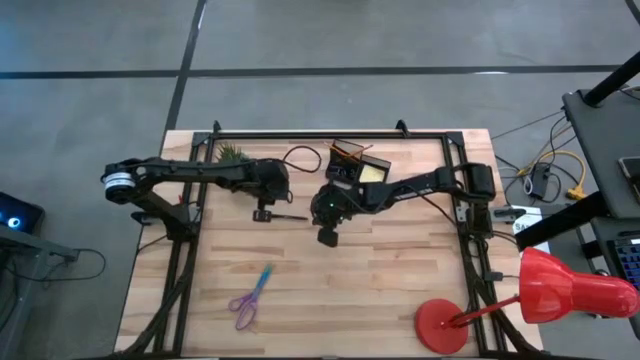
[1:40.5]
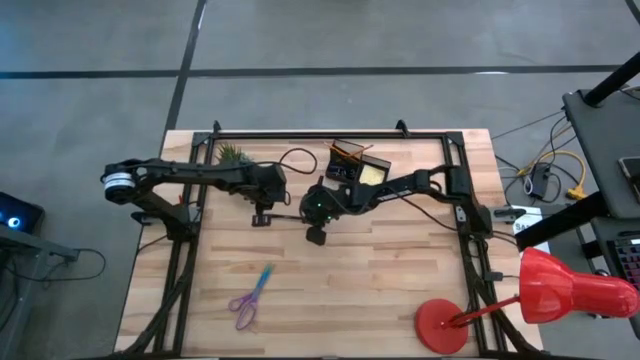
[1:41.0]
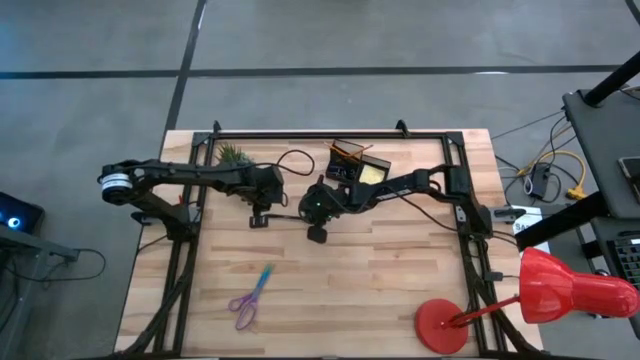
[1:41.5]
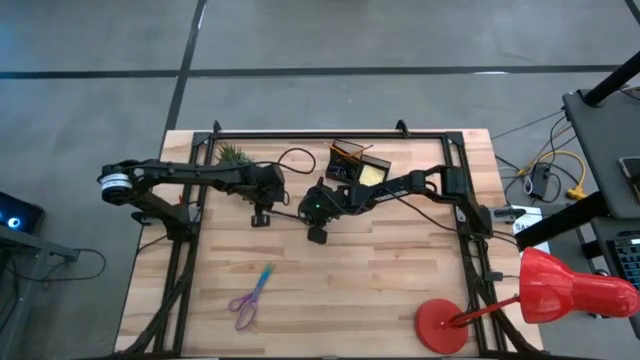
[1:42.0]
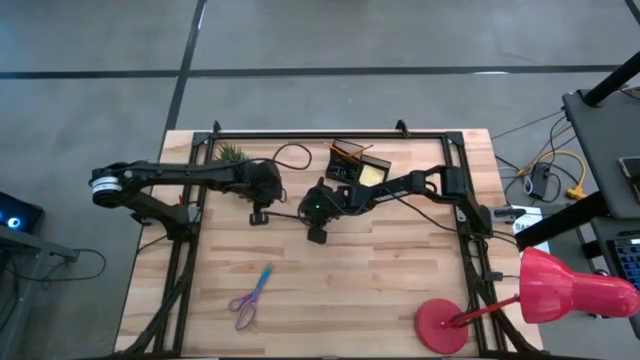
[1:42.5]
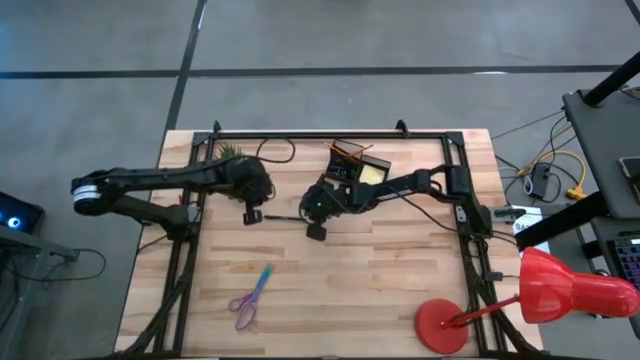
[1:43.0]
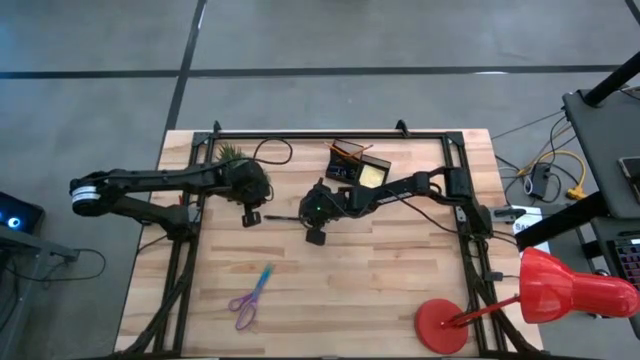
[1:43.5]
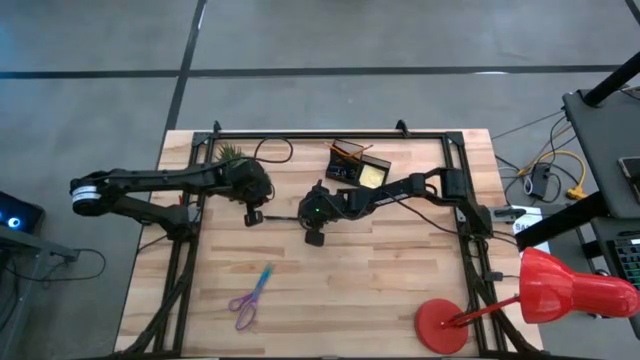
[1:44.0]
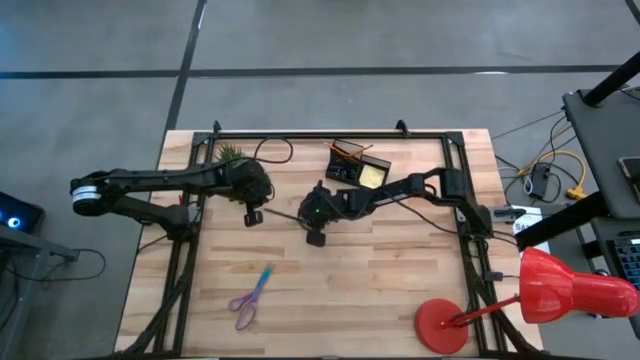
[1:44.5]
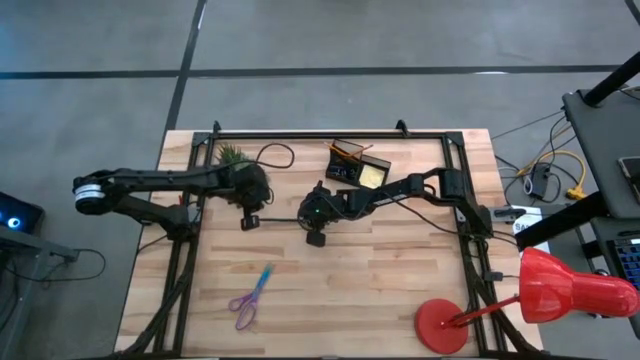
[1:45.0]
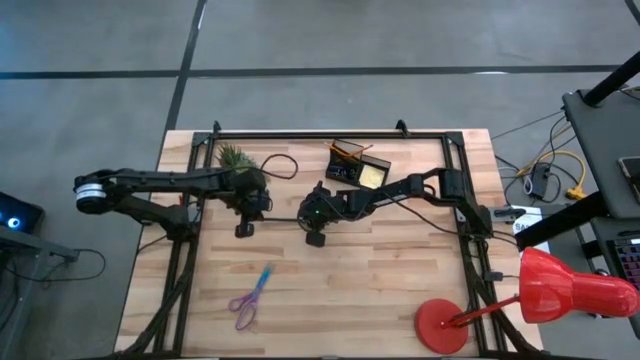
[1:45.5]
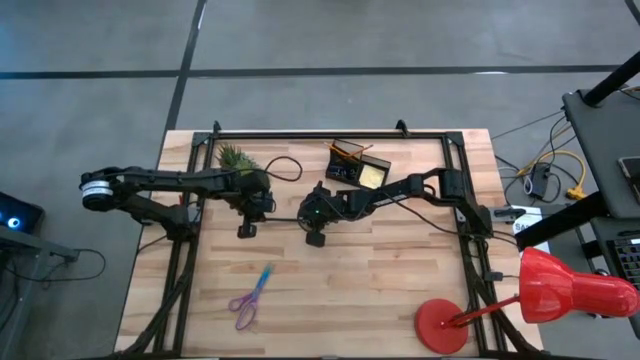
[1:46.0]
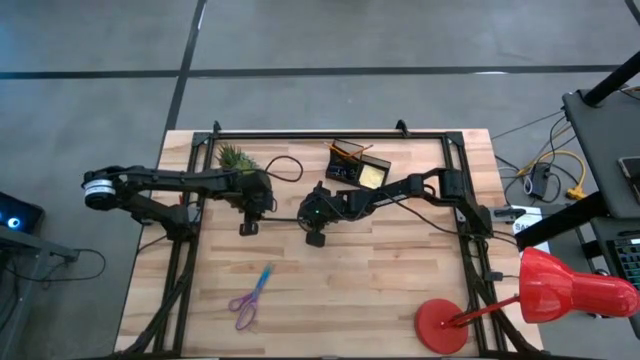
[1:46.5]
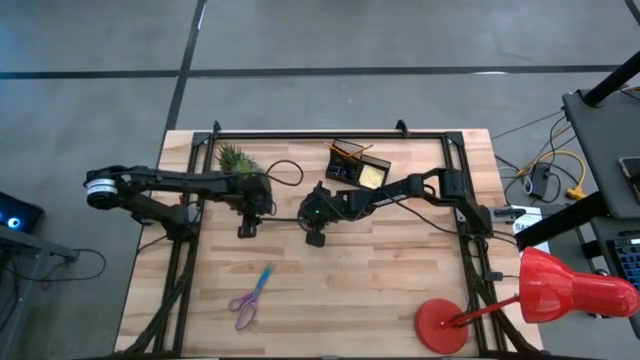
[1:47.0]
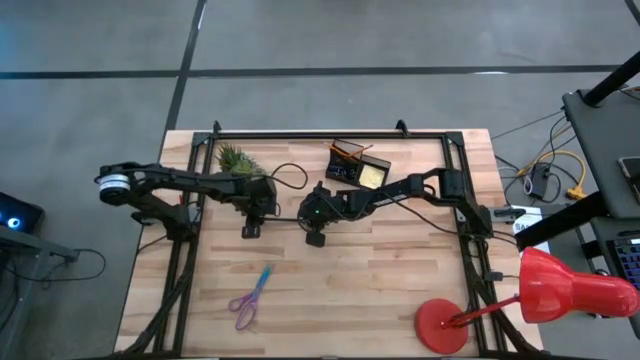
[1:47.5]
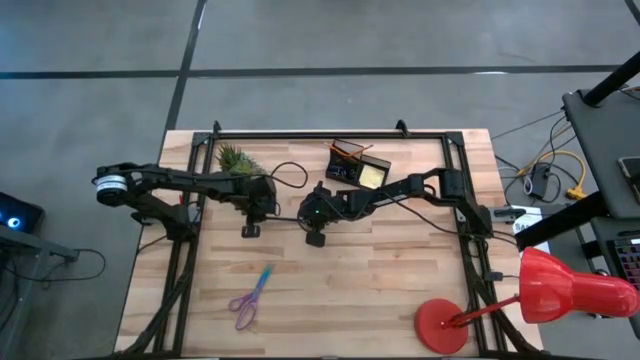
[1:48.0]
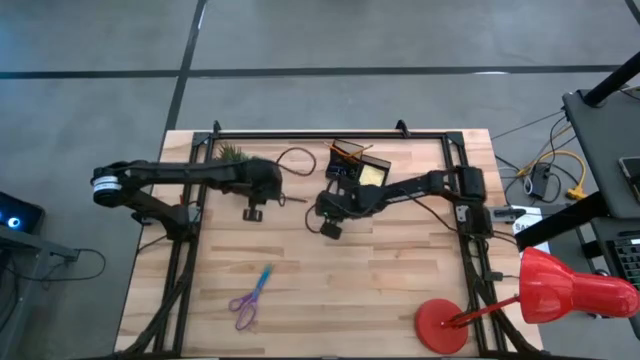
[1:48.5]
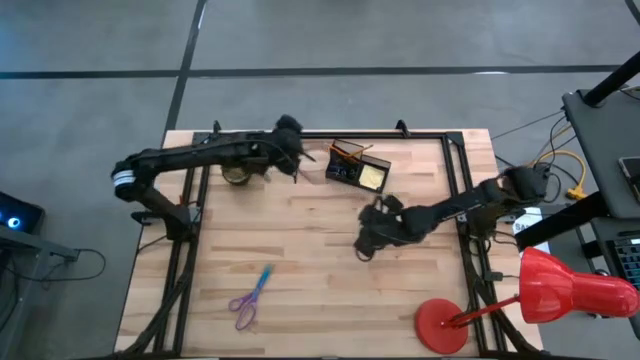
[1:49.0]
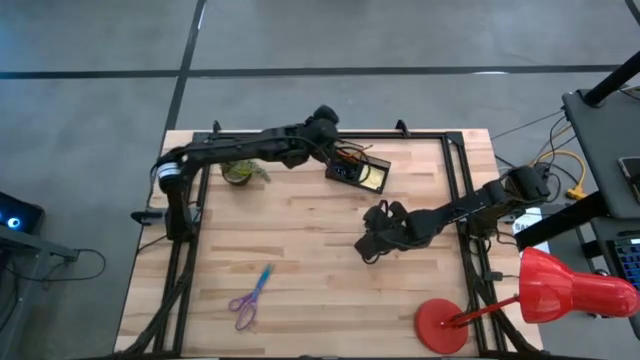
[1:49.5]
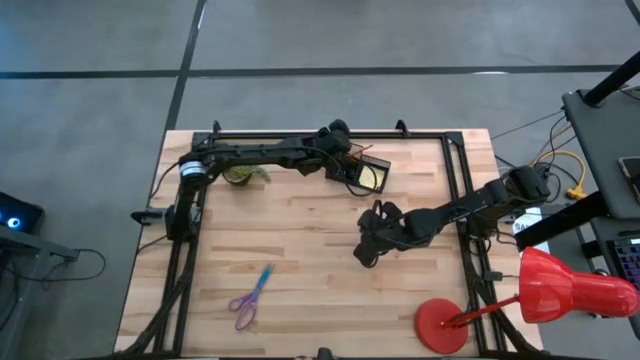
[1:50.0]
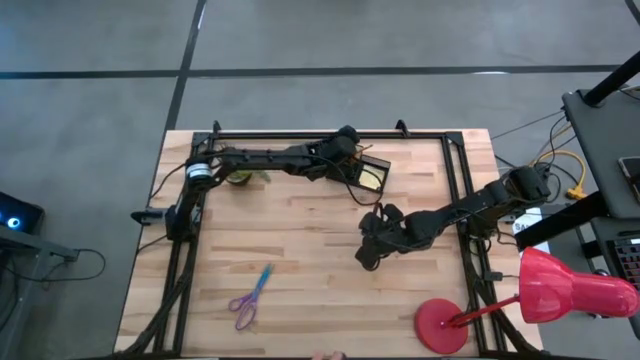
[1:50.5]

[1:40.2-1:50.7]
Task: Pick and place office supplies into organizer
Put the black pen into the black desk organizer

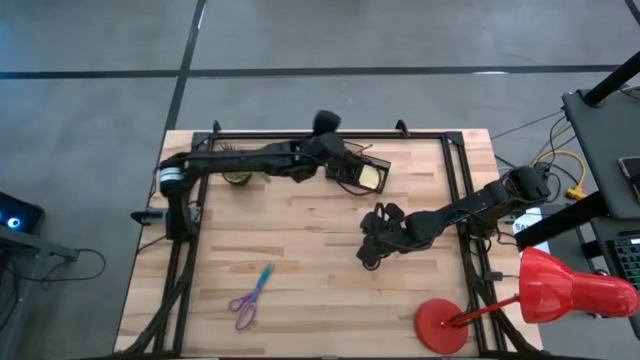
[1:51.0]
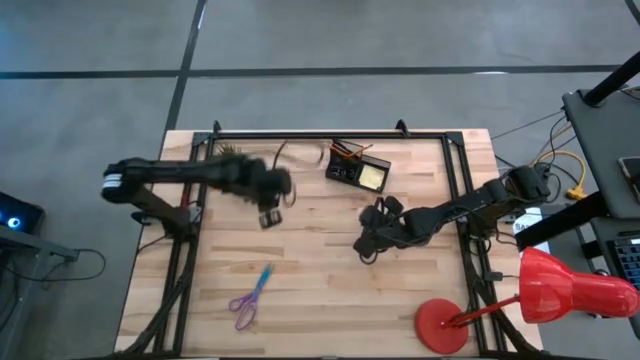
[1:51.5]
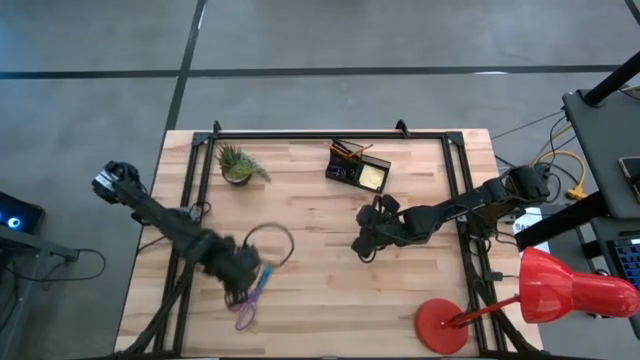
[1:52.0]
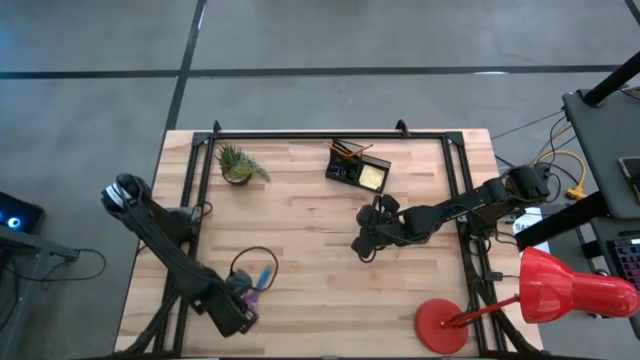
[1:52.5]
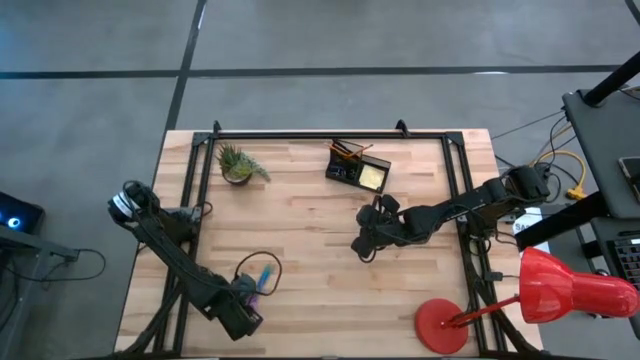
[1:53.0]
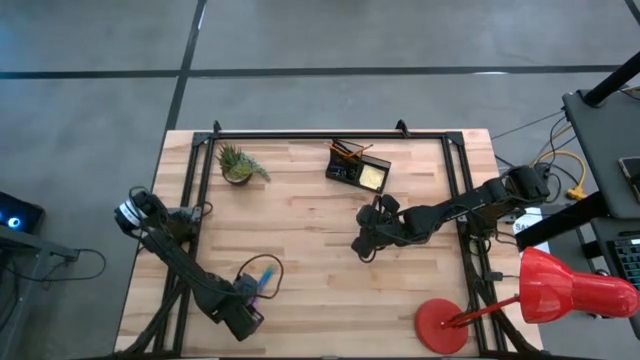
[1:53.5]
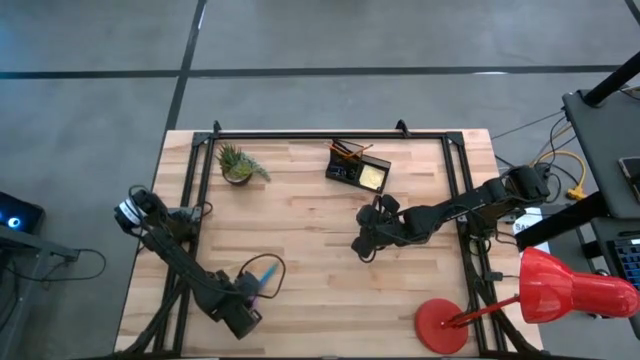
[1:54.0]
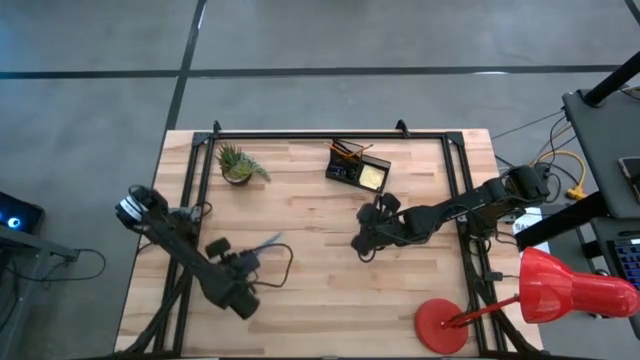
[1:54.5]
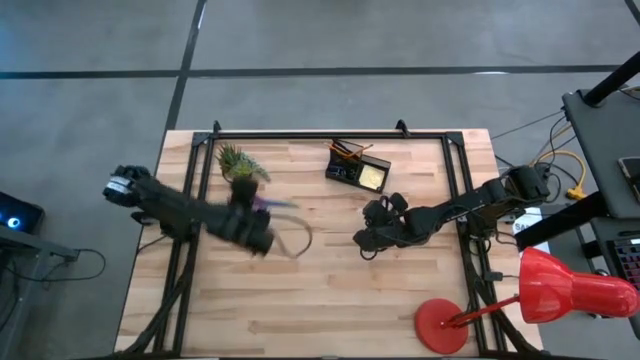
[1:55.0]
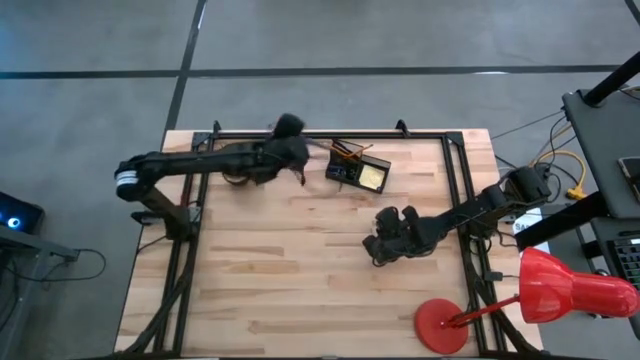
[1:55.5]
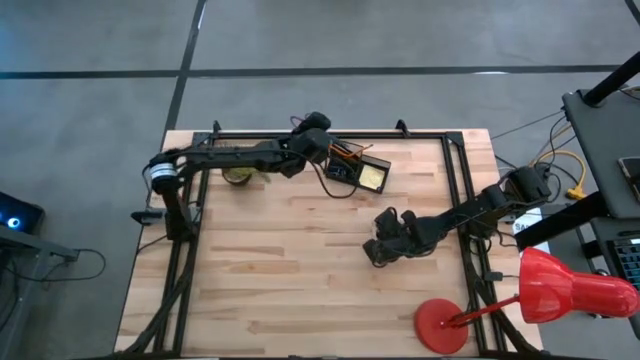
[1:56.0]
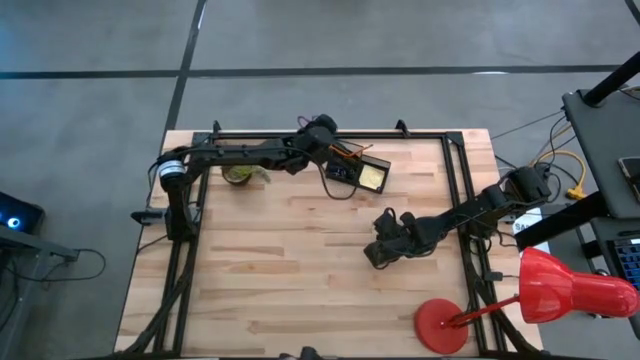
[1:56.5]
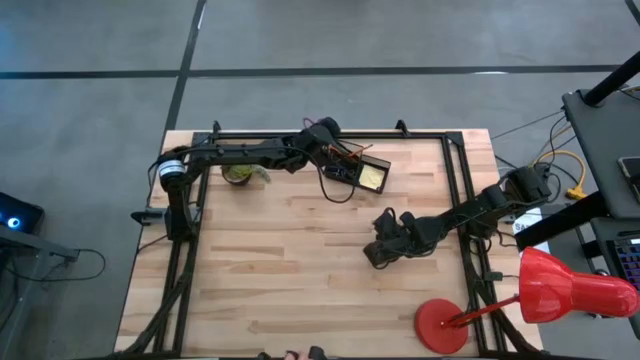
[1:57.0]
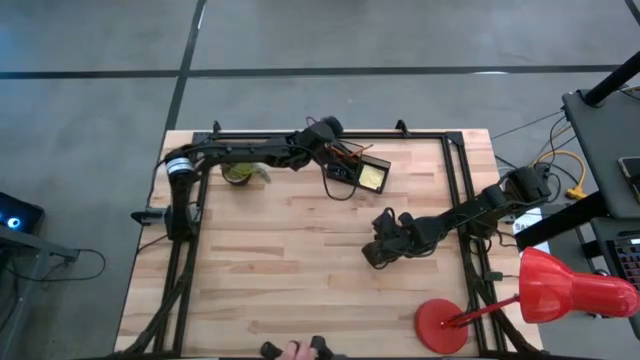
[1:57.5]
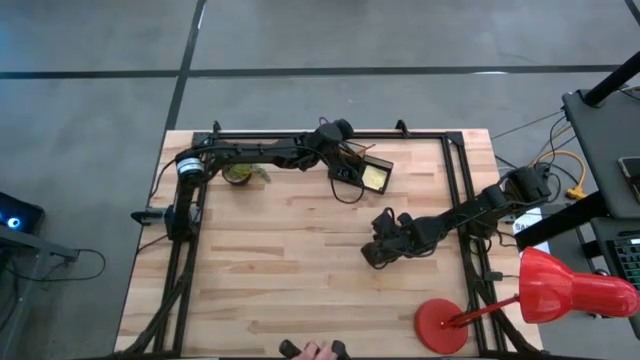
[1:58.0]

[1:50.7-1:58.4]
Put the purple scissors into the black desk organizer

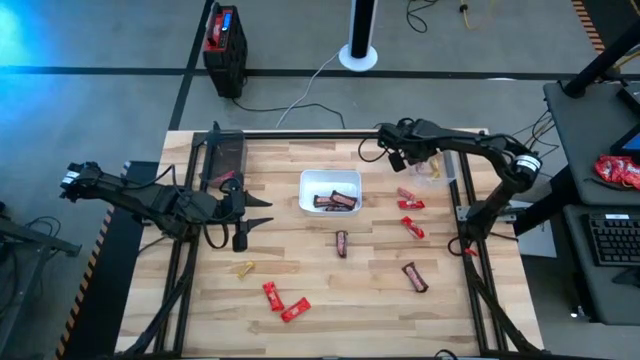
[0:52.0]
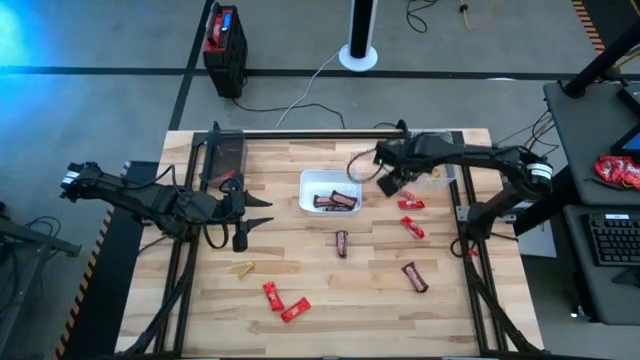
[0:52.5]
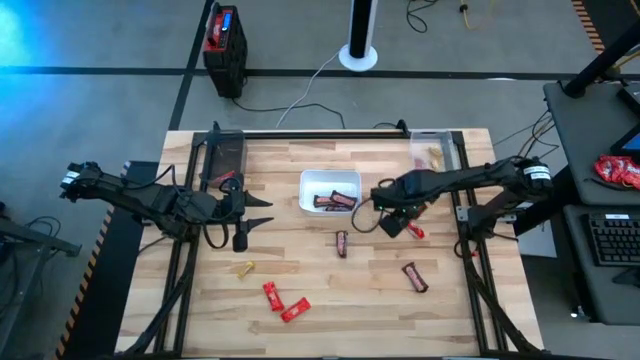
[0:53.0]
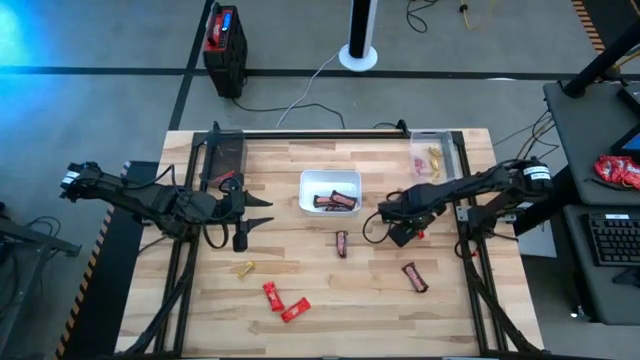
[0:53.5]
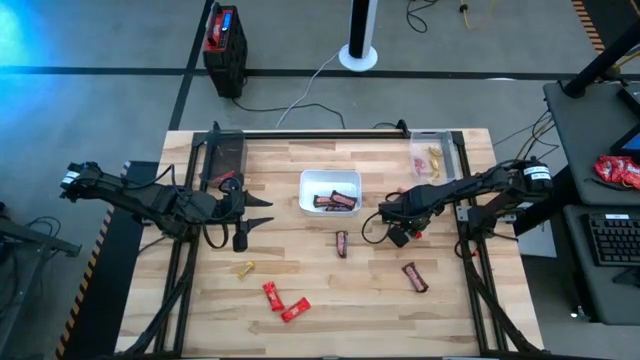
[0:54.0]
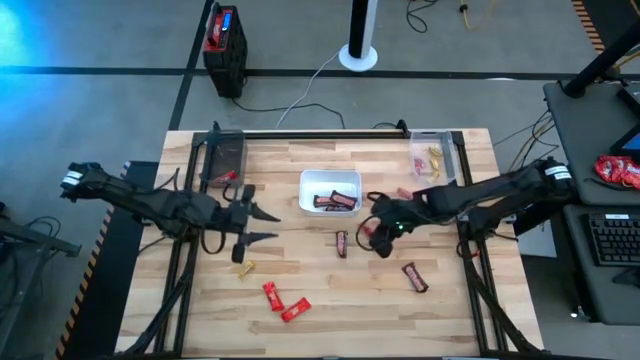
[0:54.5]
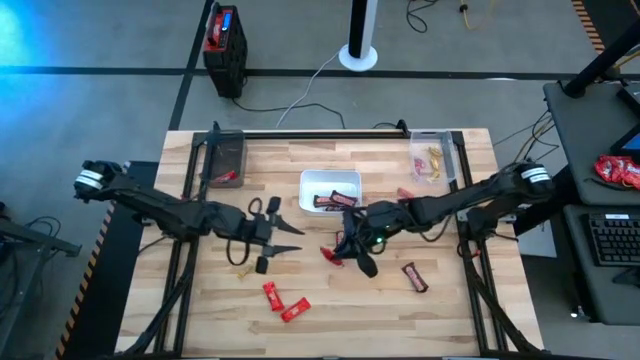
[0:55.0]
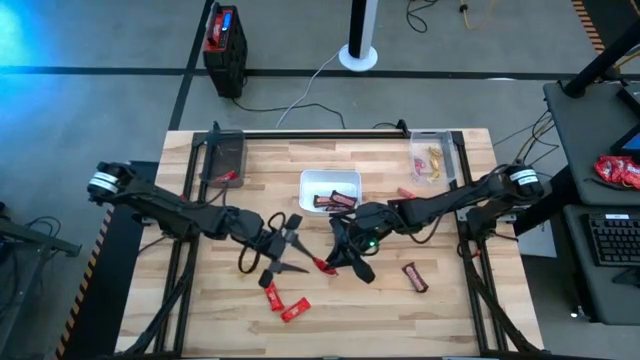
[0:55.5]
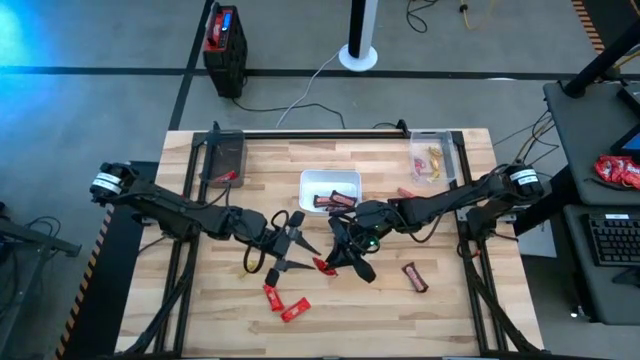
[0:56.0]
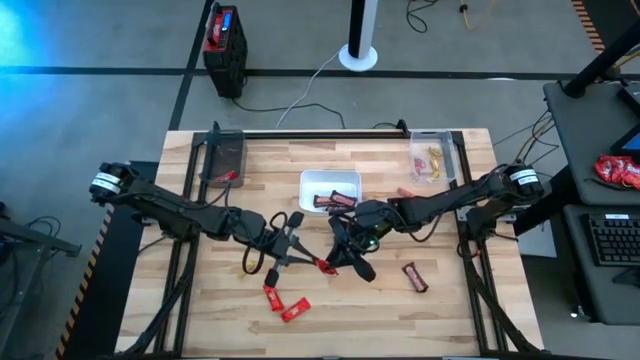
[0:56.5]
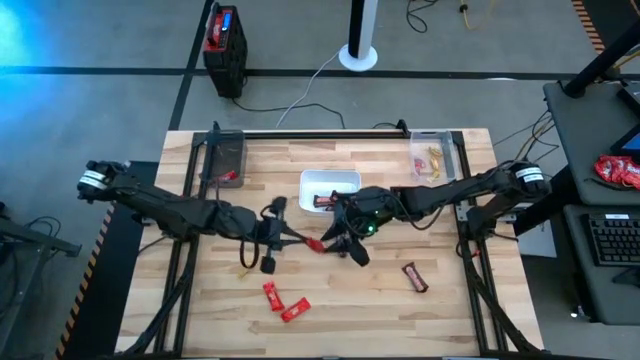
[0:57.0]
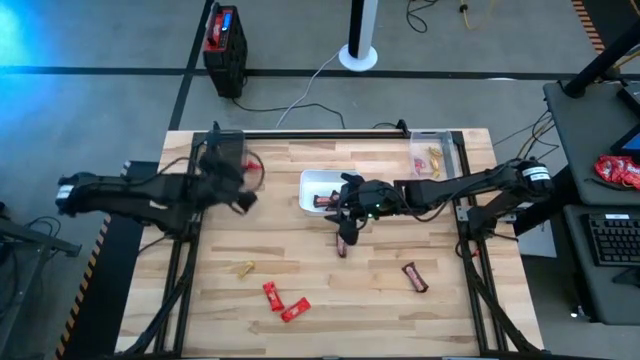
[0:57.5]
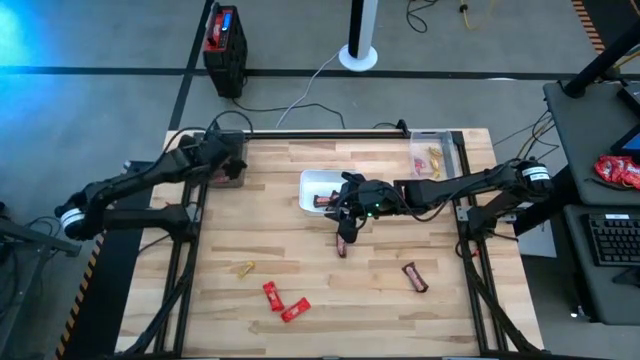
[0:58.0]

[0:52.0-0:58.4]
Task: Sort candy by brand, put in halloween buckets
Put the red chocolate bar into the black bin
